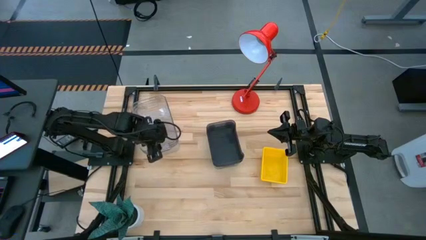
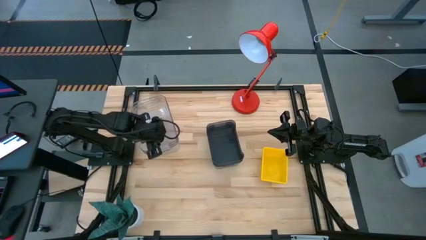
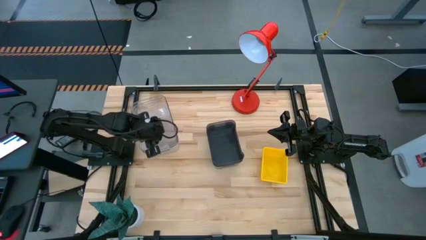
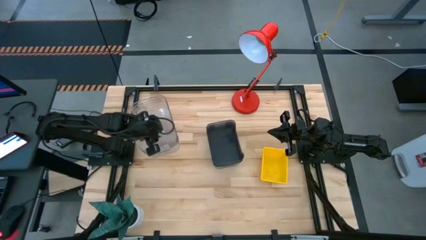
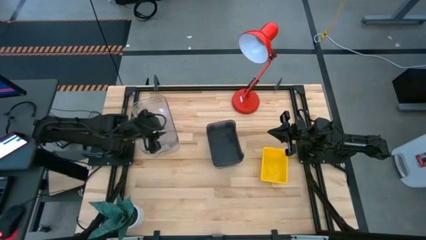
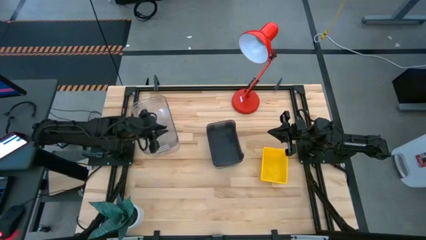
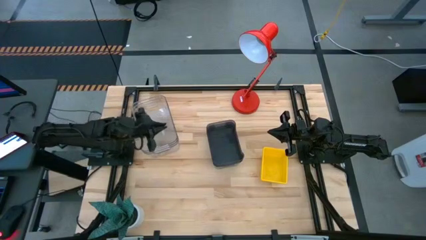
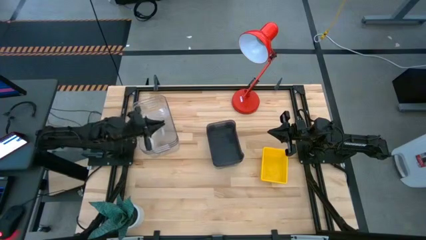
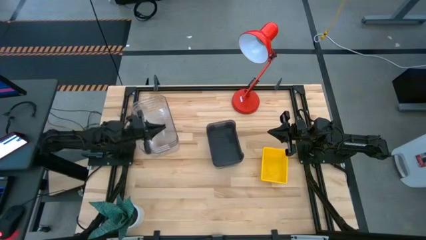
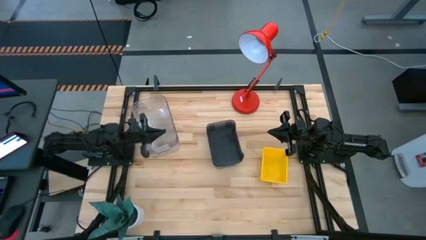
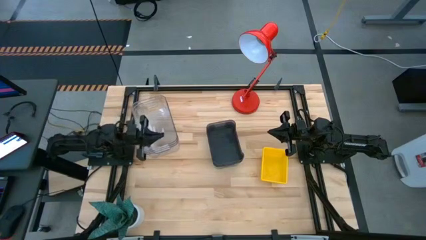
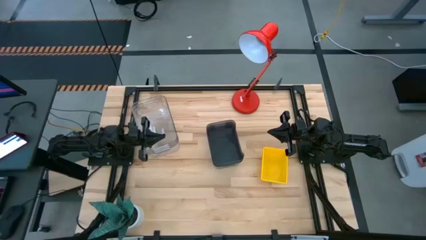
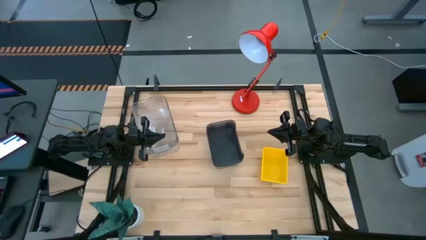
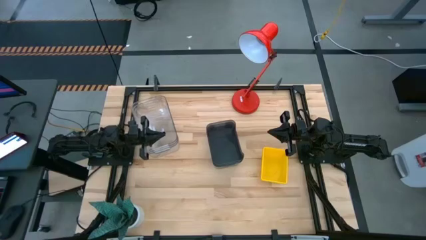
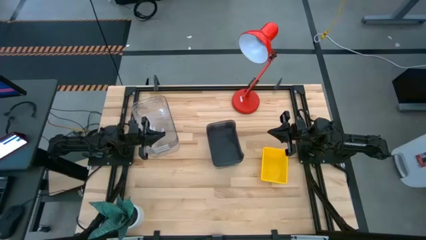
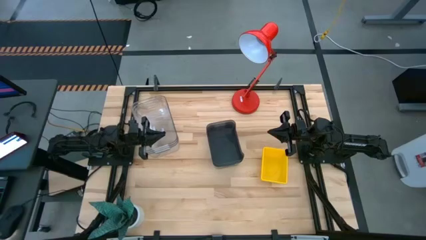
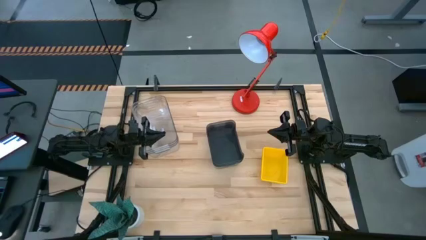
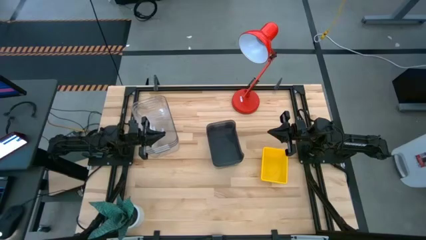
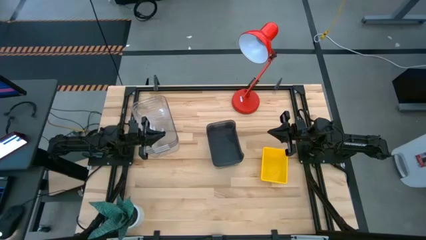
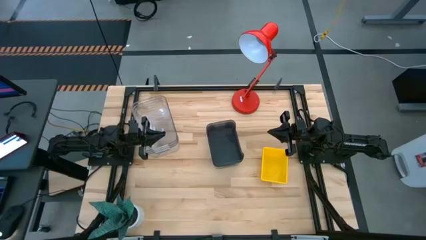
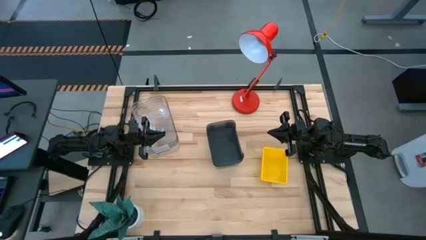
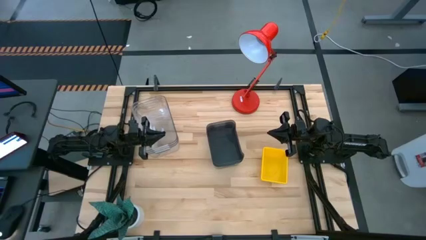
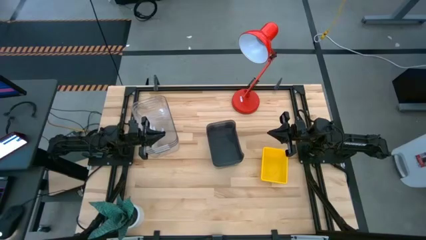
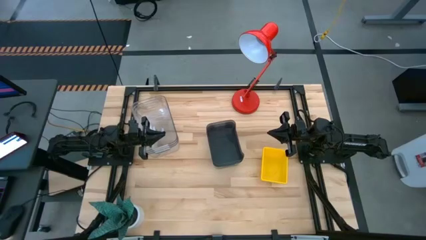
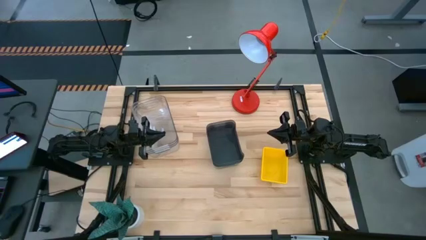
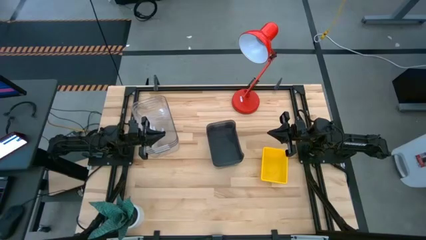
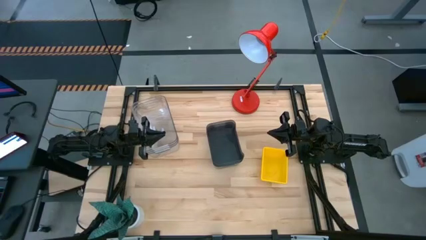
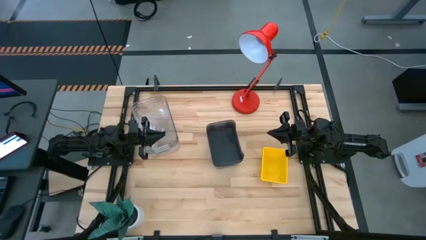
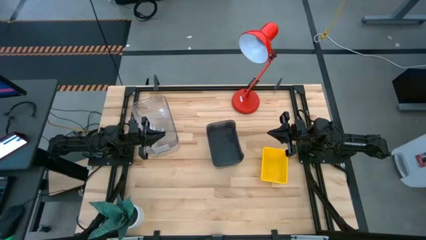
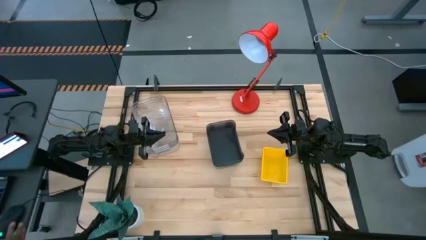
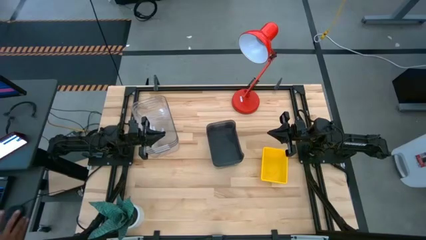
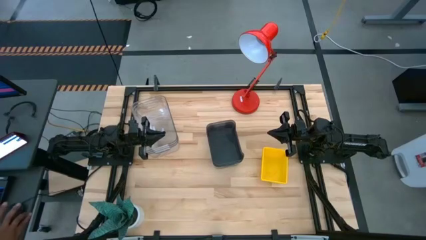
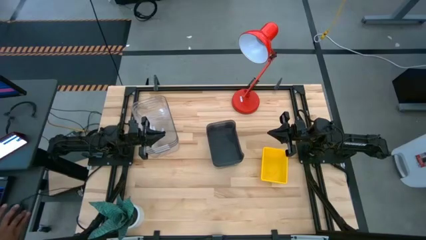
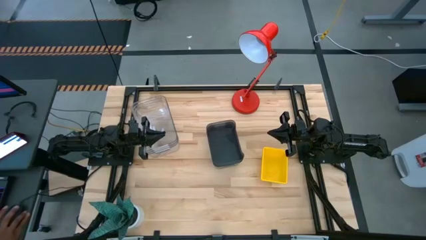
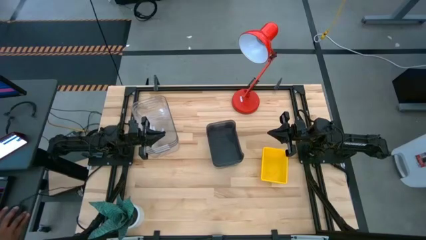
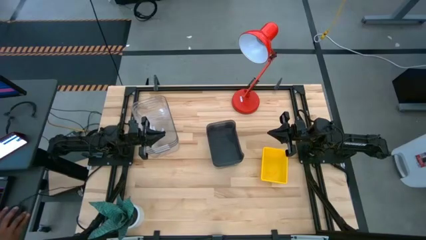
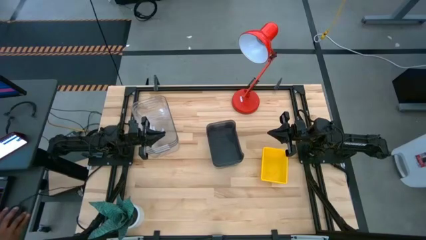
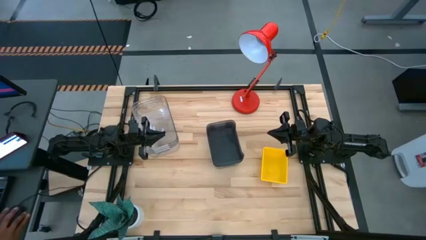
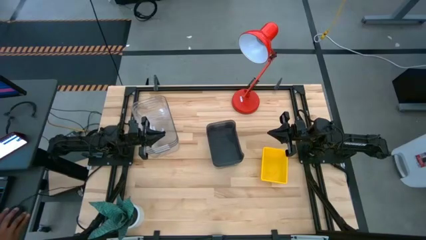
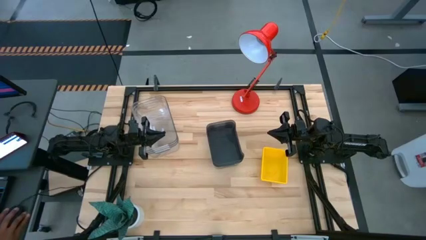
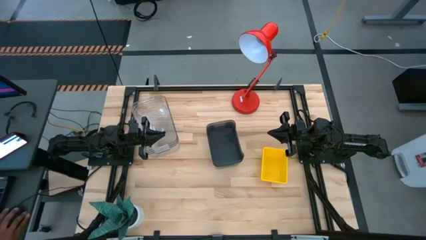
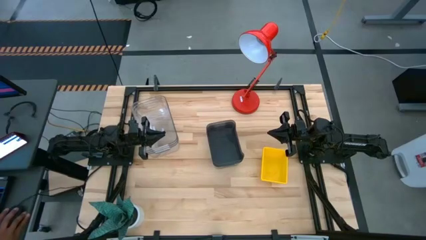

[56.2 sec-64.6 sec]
Return to Home Position
